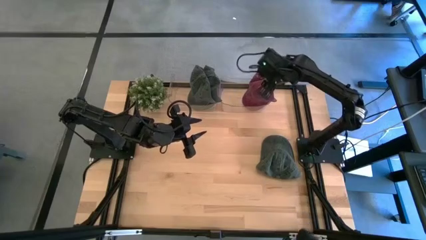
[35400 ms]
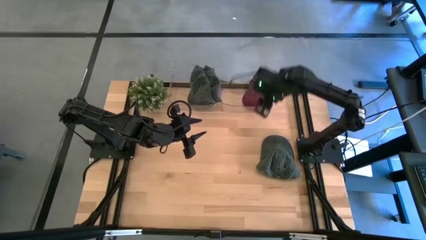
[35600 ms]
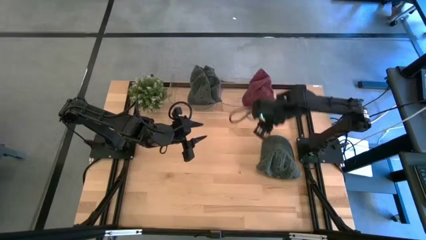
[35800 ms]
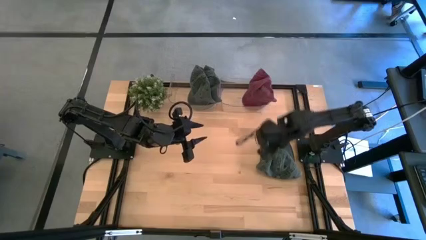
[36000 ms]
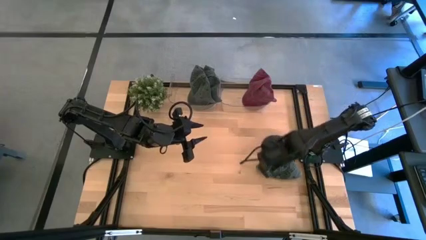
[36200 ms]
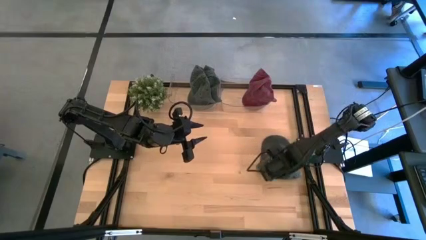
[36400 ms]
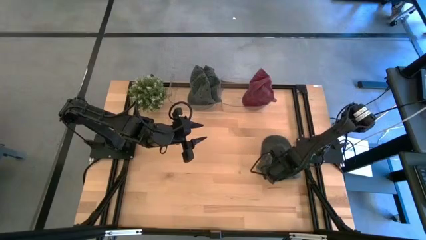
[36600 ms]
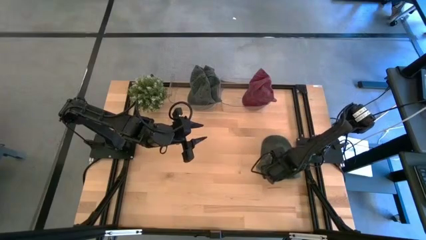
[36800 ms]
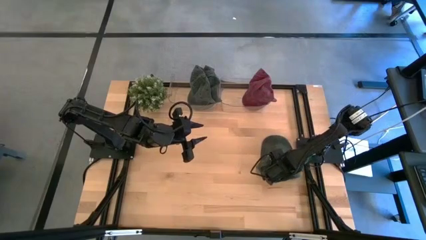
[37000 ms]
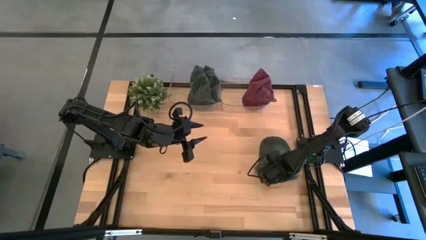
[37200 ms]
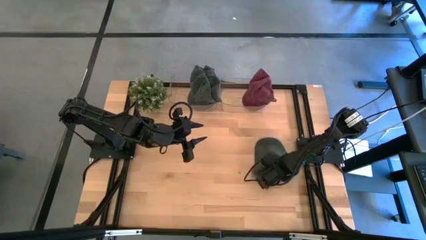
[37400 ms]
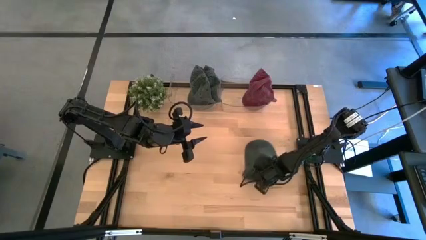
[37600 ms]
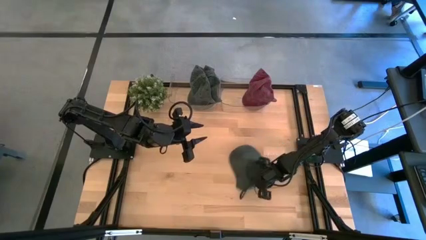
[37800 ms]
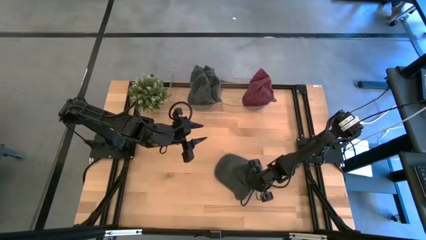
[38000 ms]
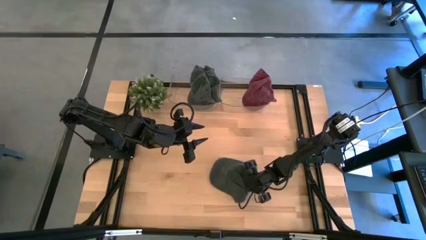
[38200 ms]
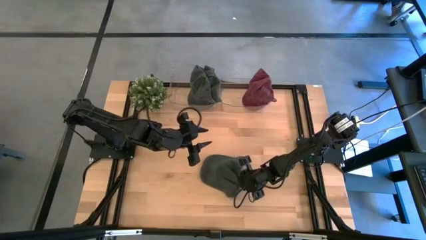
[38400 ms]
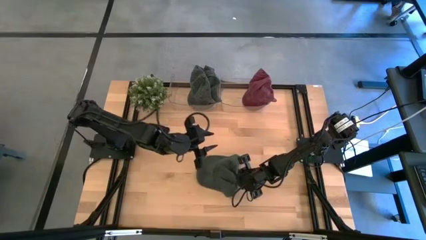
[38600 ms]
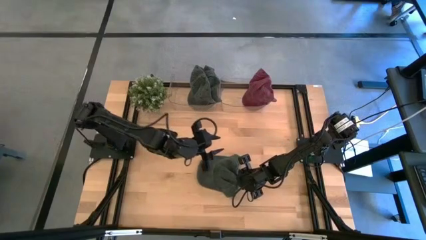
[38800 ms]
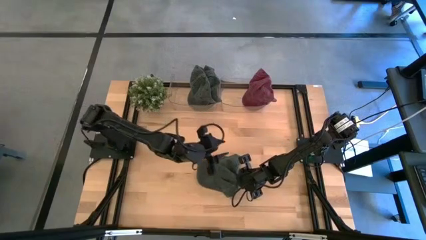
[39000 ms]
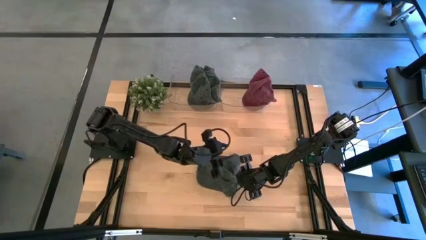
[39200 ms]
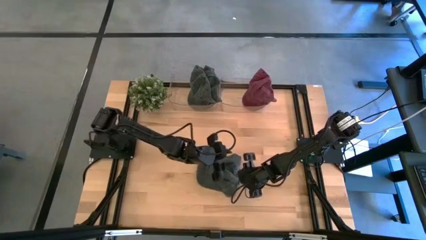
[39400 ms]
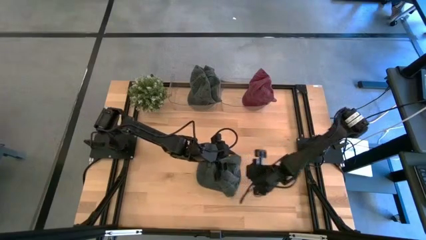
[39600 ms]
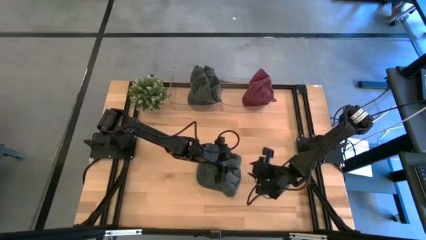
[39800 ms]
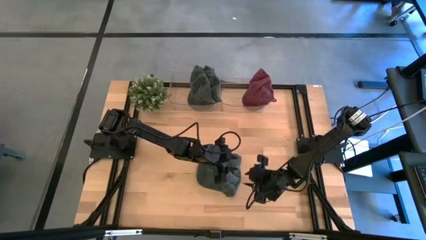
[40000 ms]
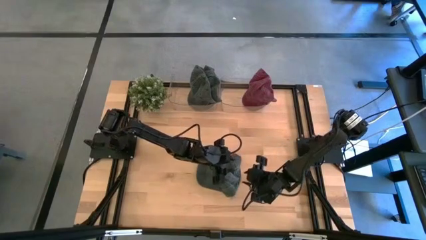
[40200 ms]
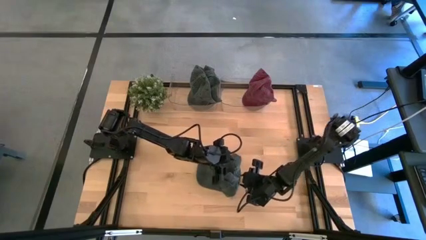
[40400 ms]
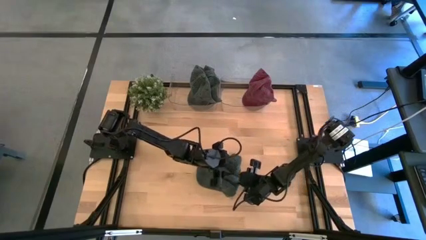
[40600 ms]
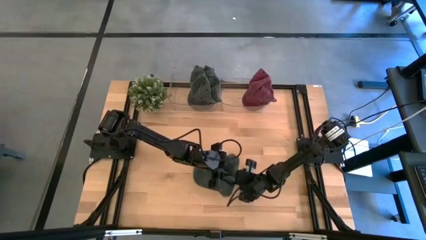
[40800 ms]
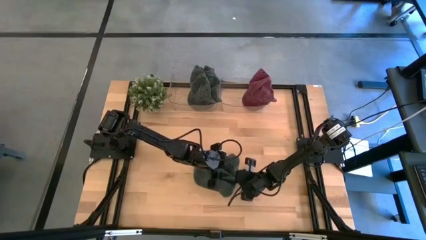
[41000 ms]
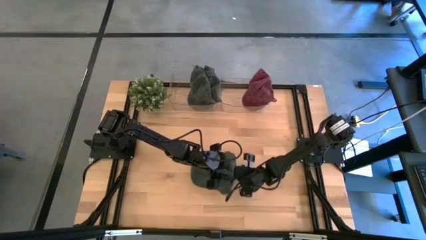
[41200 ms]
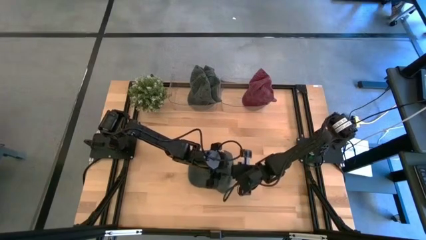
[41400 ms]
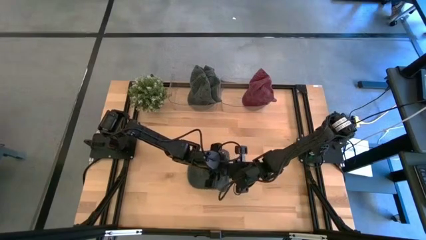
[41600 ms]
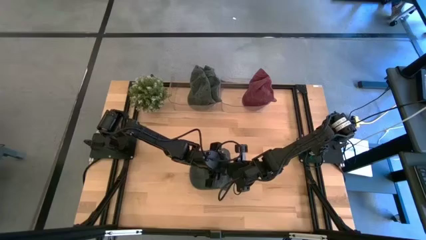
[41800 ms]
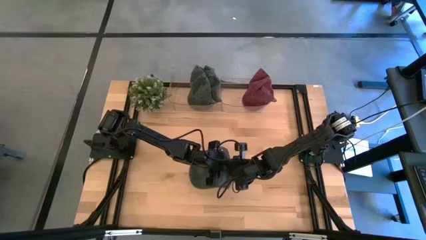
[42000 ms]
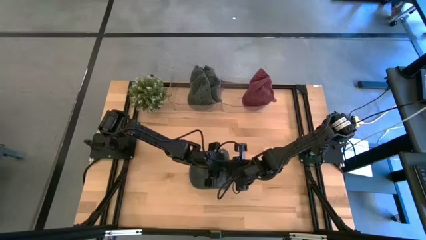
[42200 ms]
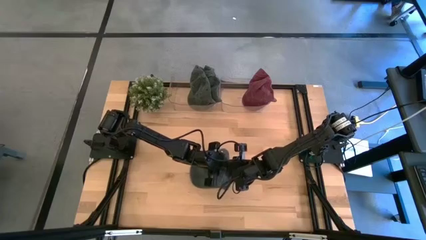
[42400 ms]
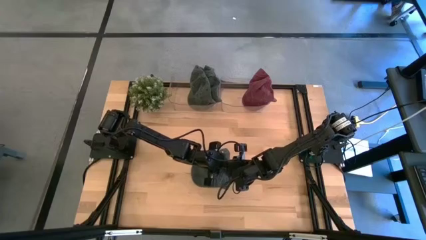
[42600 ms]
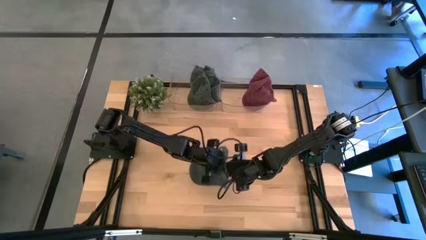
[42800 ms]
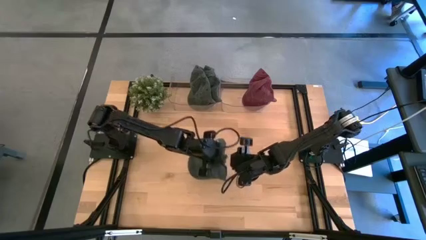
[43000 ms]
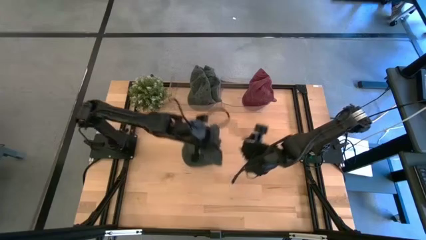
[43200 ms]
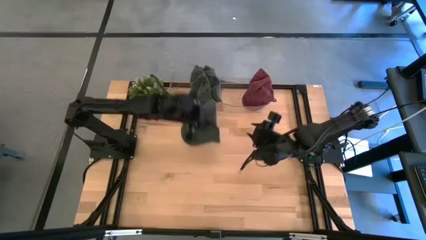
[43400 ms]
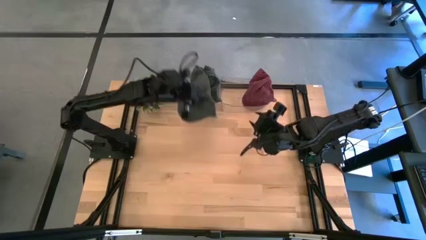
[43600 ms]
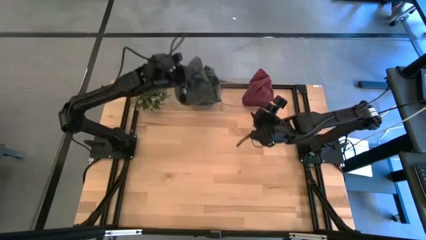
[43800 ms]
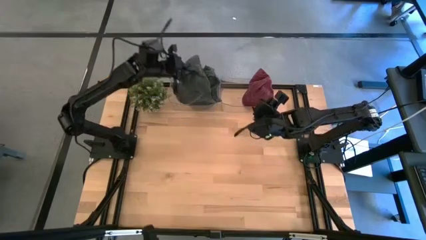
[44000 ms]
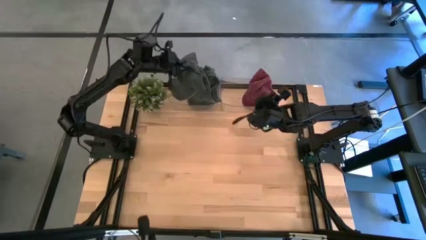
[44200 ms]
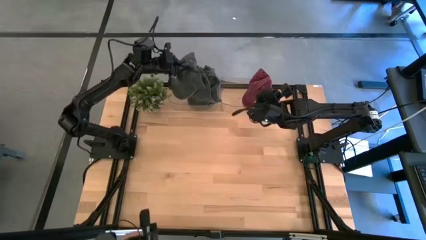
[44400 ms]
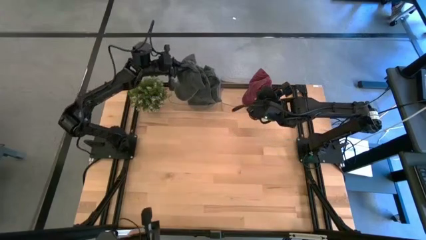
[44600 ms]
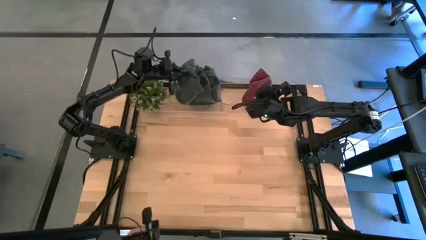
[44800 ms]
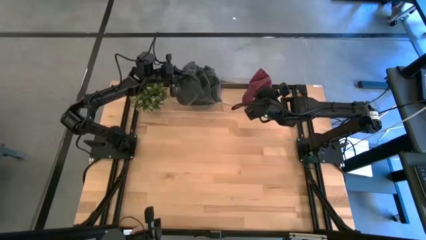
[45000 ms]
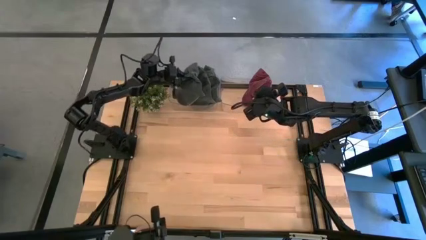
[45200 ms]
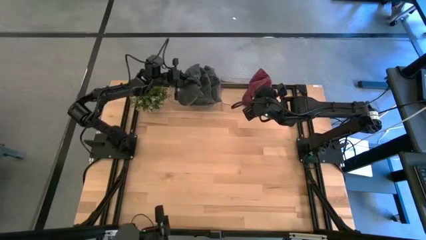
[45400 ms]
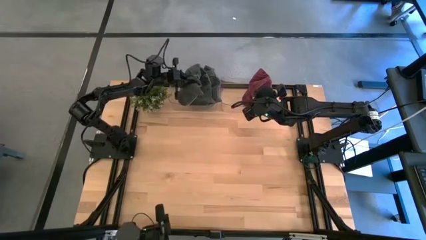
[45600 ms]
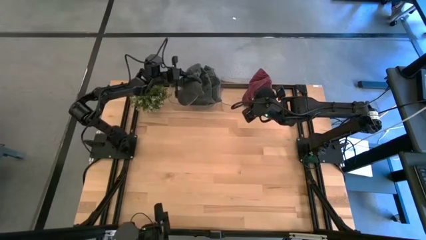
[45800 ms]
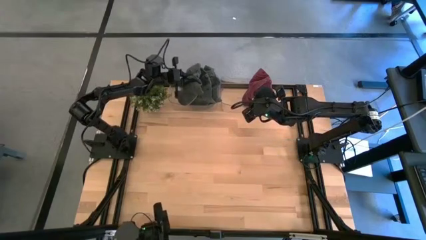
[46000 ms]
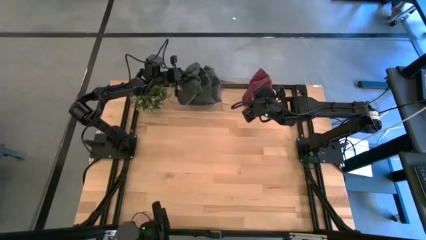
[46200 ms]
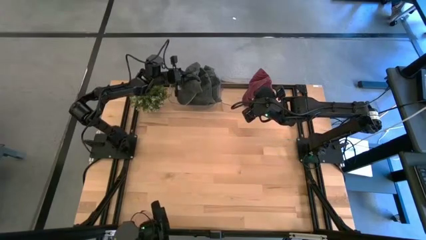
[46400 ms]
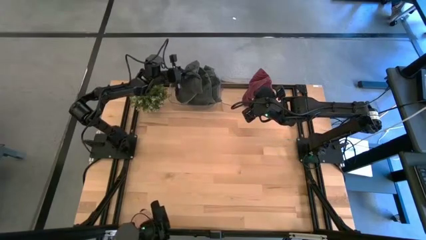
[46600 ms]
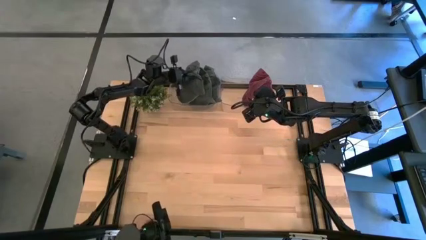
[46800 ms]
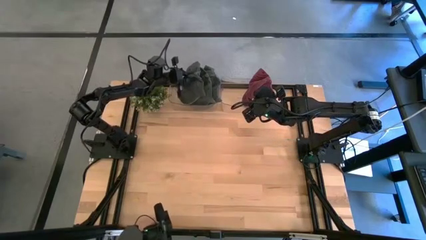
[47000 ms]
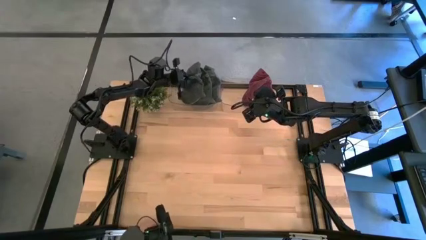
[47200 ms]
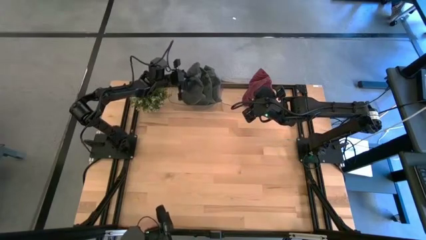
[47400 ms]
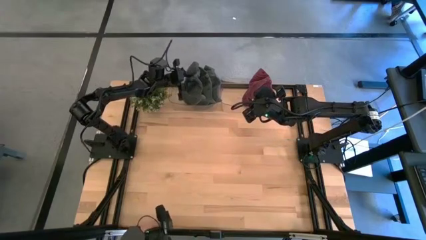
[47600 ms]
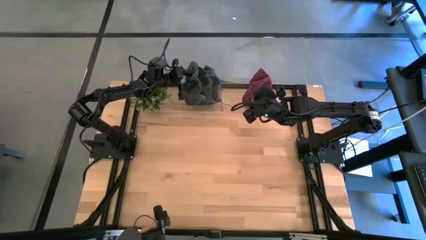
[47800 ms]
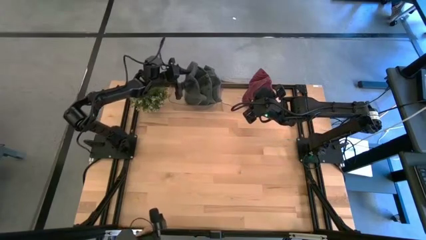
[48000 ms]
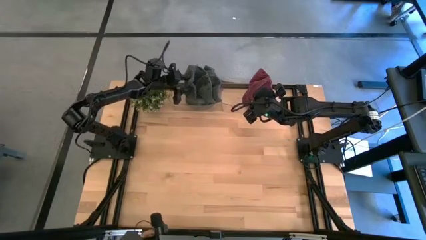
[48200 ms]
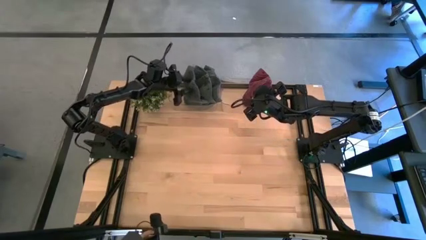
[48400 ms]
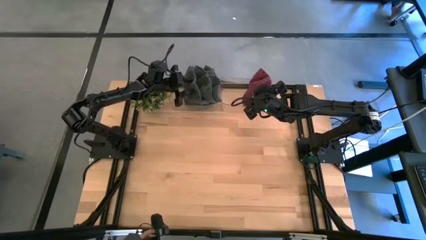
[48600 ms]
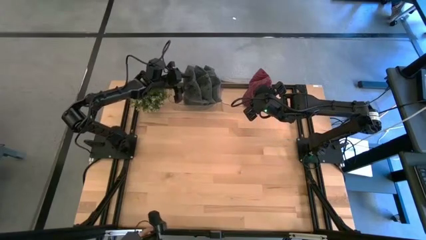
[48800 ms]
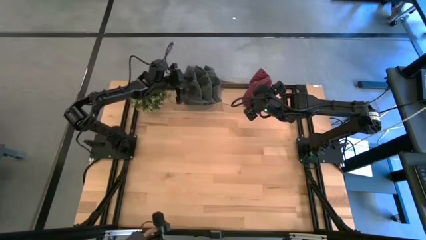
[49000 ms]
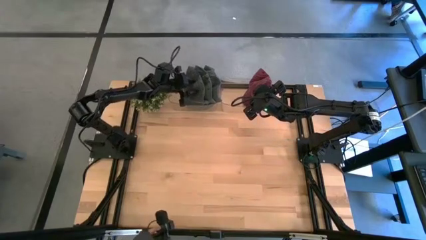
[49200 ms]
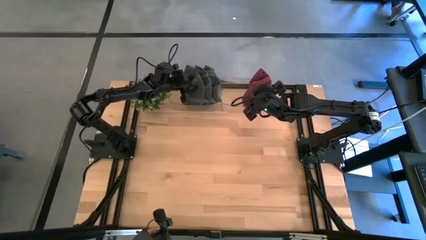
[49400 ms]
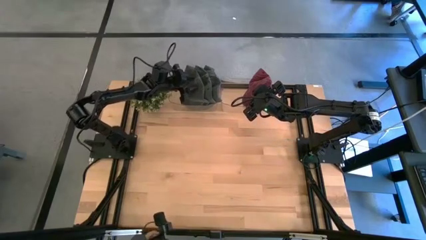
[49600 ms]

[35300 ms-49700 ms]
Task: Pick & Place hat
Put the black cap into the left transparent bin
